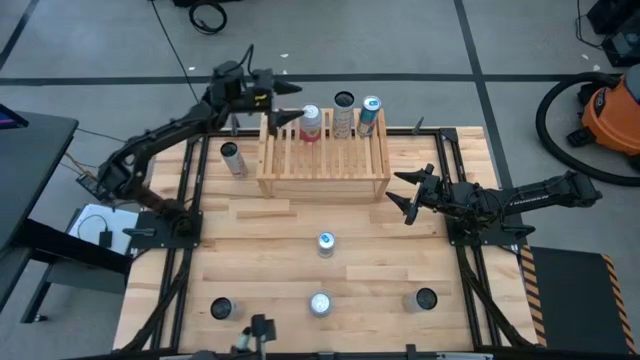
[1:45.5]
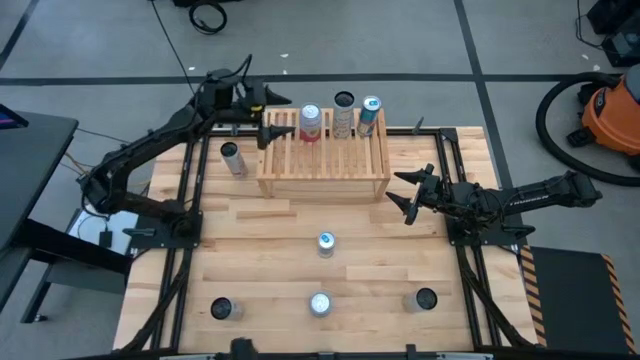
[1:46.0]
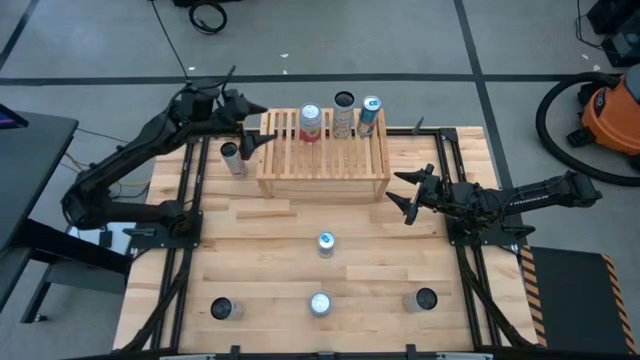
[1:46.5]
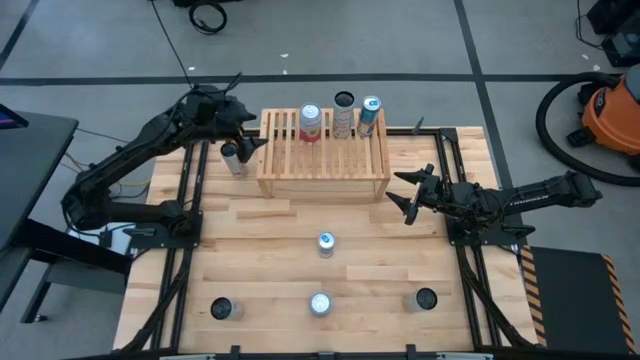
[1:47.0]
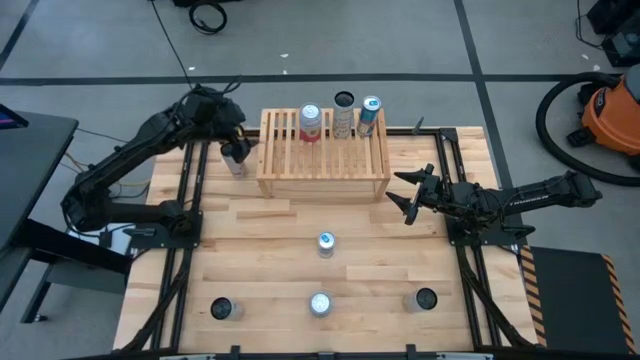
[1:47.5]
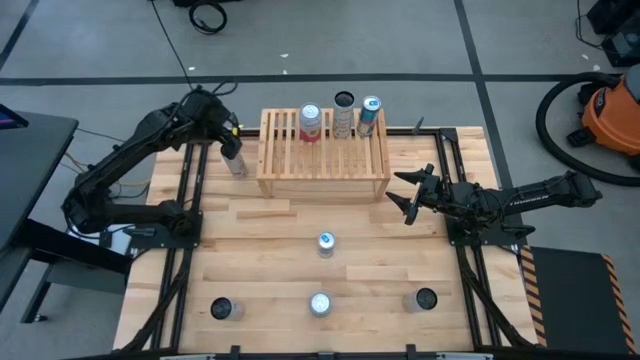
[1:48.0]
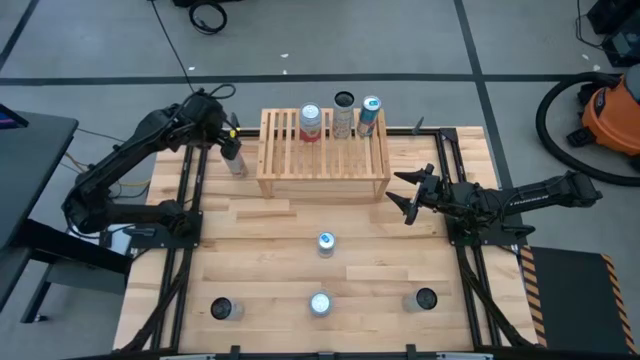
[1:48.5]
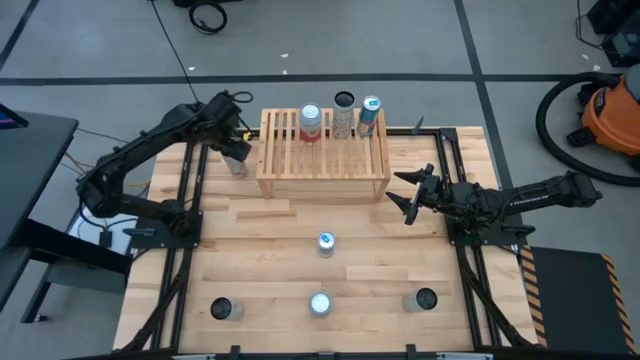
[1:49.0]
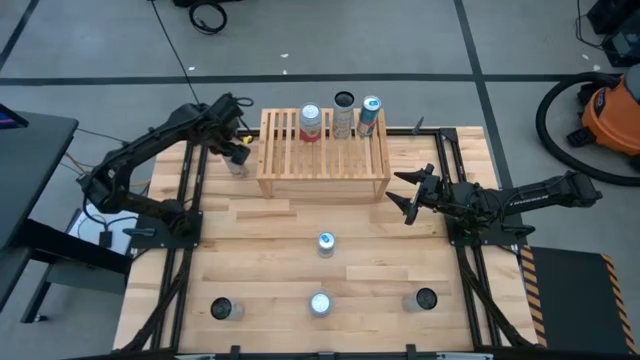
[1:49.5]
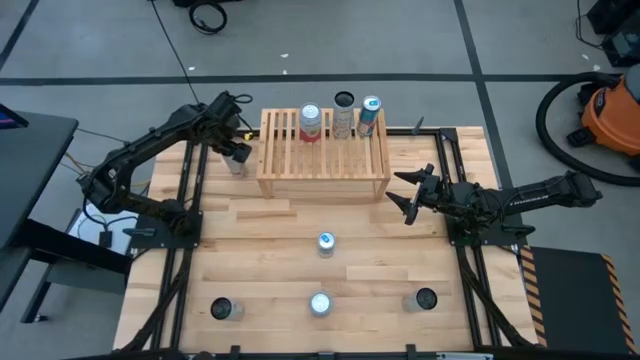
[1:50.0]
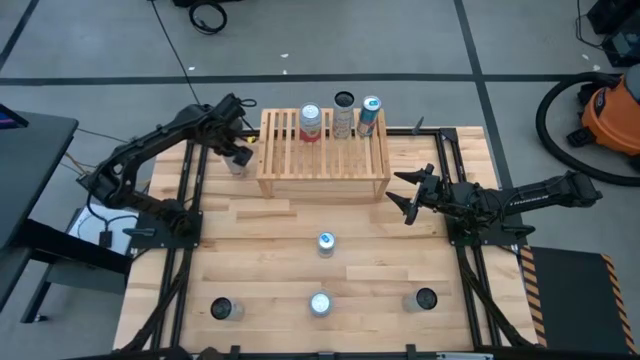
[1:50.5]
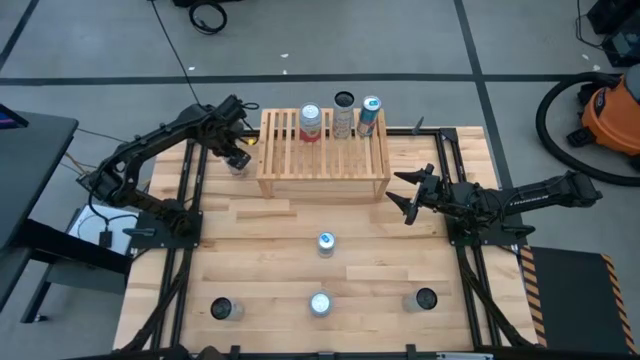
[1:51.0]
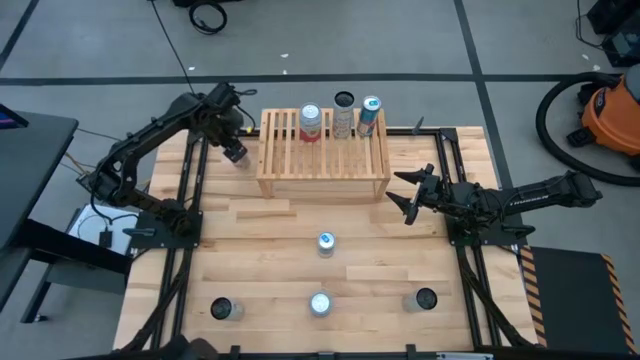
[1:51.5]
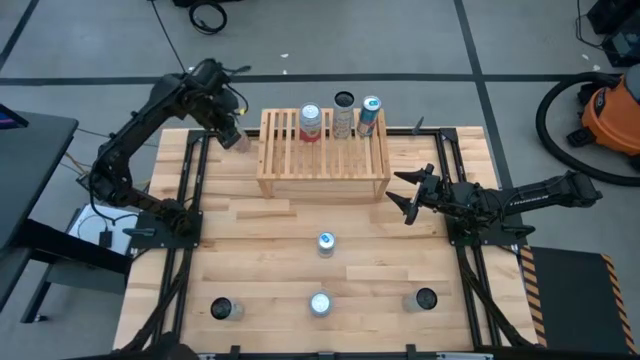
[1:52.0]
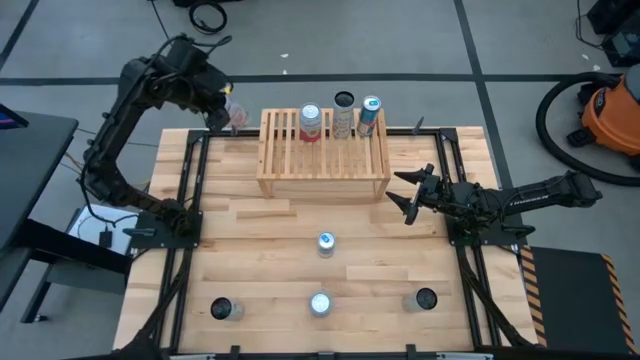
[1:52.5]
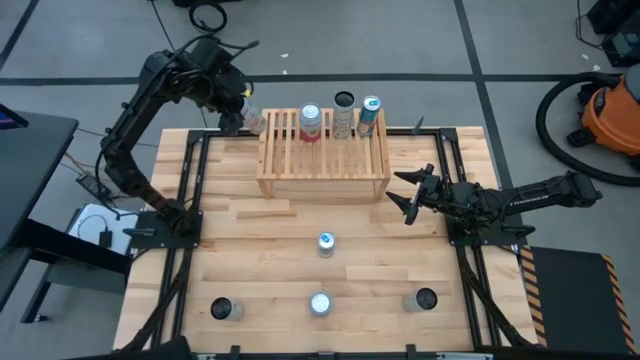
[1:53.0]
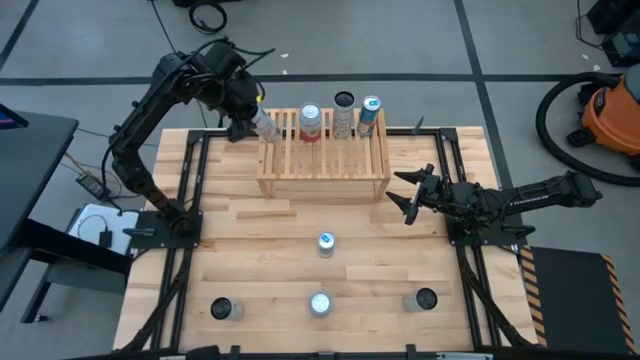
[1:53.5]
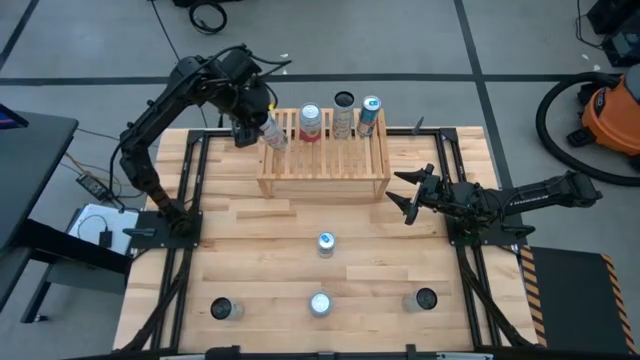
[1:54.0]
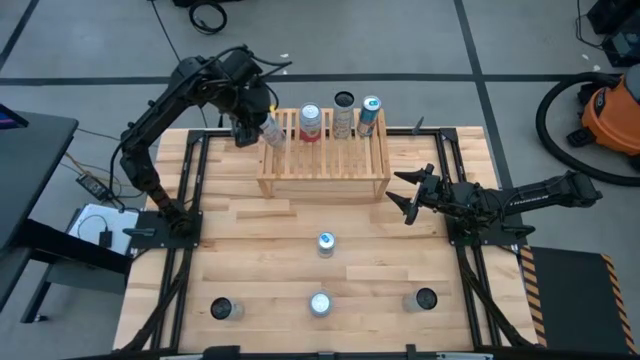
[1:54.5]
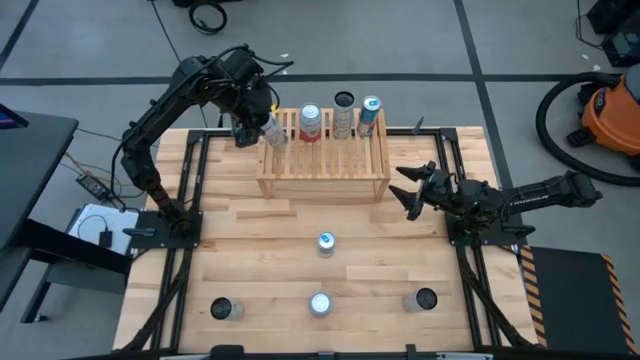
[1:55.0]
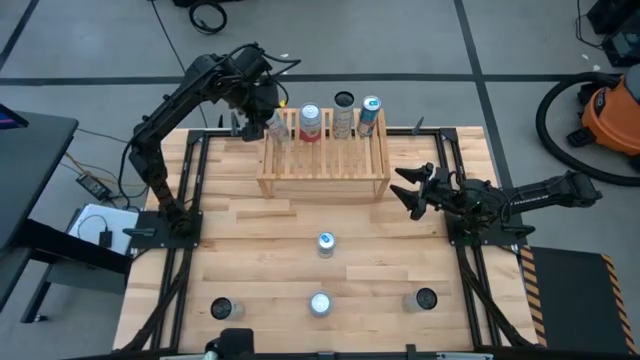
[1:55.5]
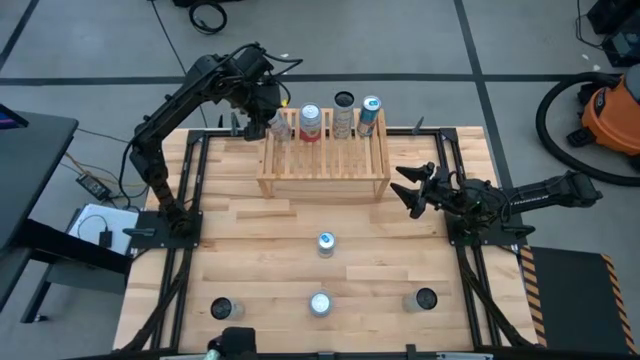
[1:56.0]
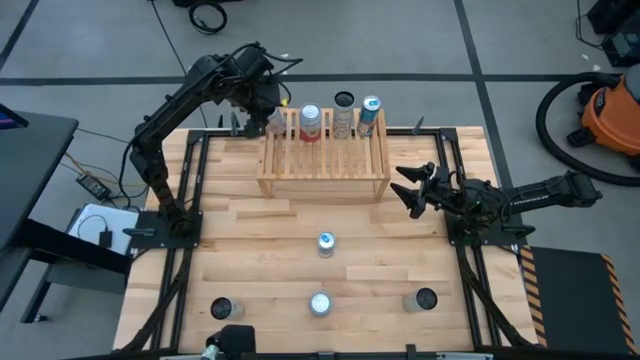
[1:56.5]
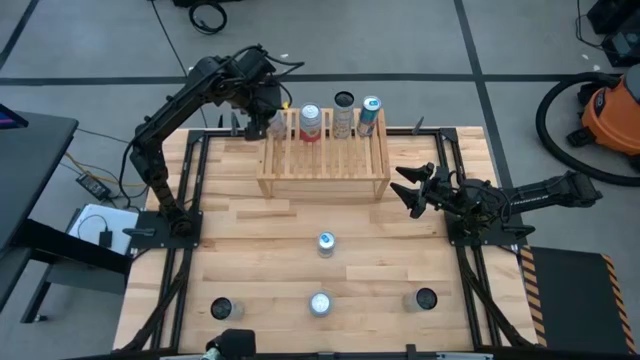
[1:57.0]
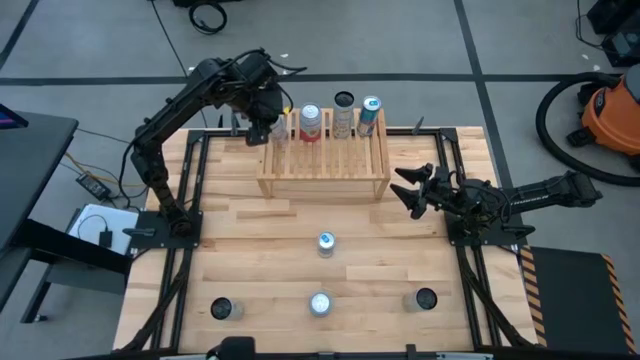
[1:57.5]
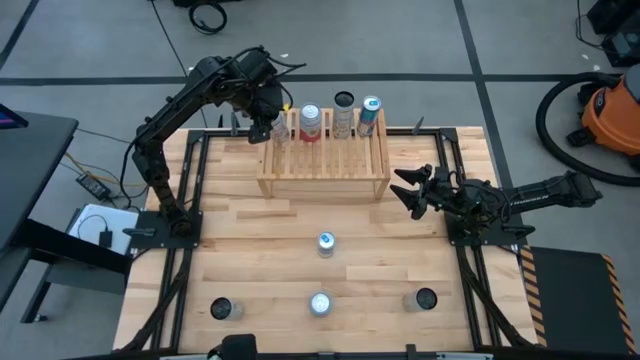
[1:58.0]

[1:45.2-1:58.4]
Task: Place canned beverage on shelf
Put the top white and pink soda can on the shelf

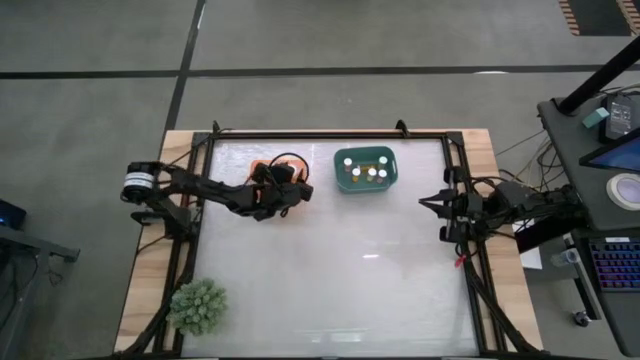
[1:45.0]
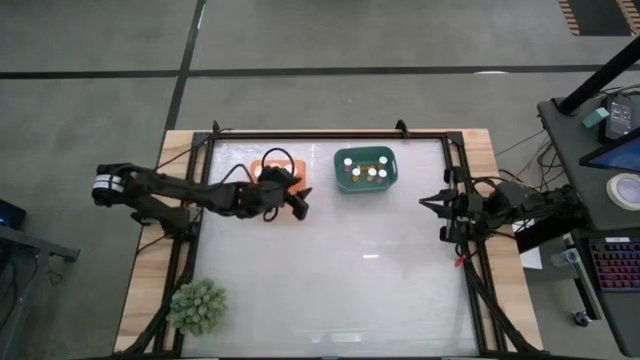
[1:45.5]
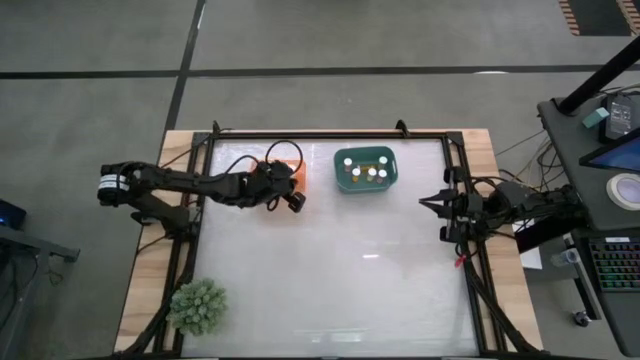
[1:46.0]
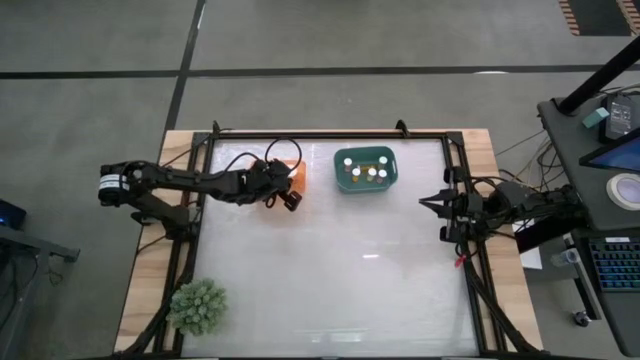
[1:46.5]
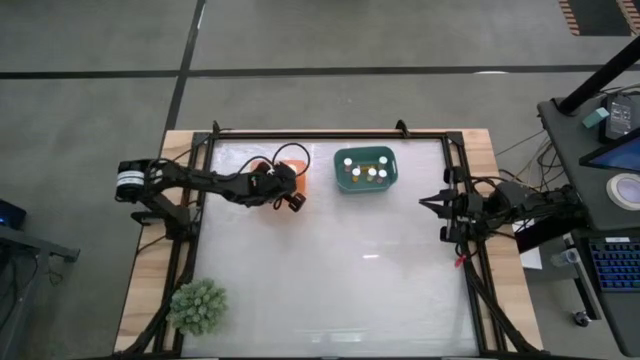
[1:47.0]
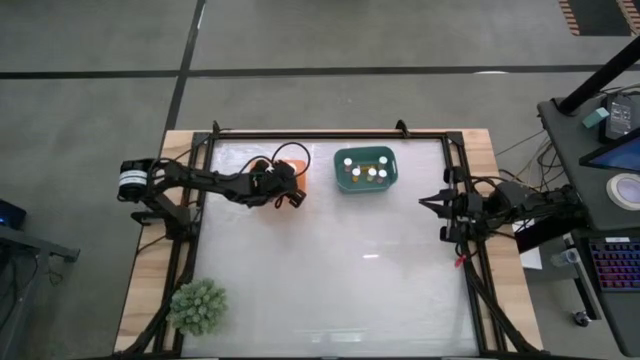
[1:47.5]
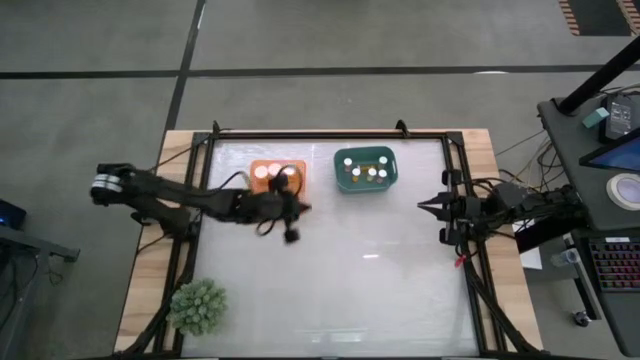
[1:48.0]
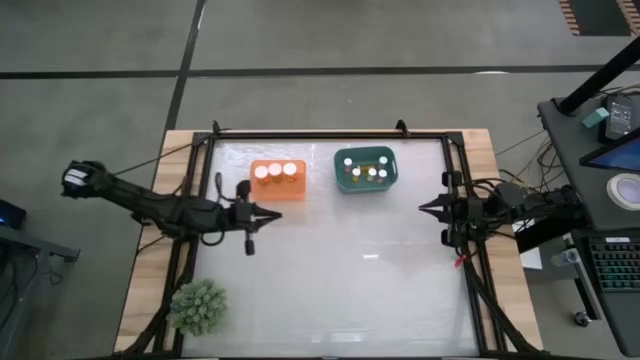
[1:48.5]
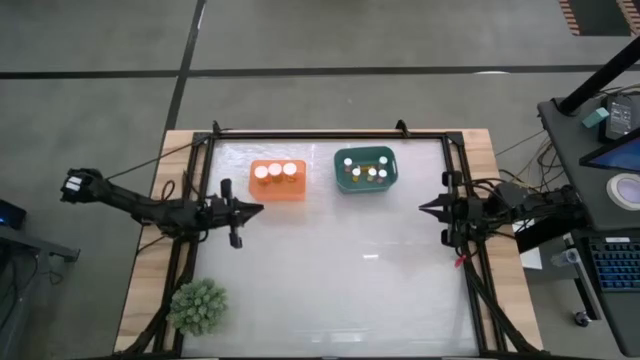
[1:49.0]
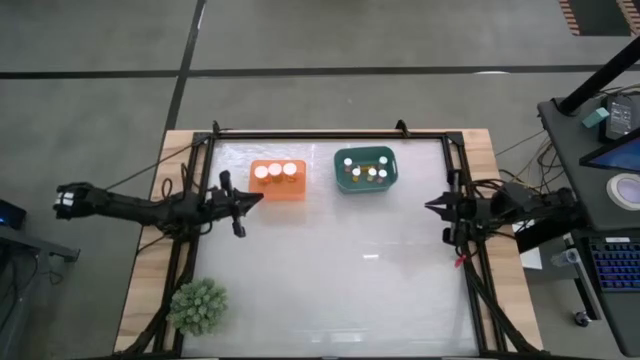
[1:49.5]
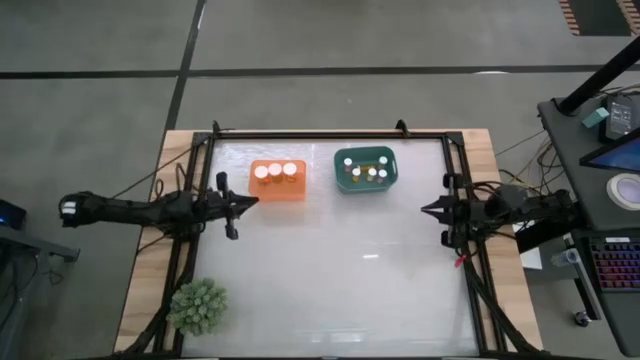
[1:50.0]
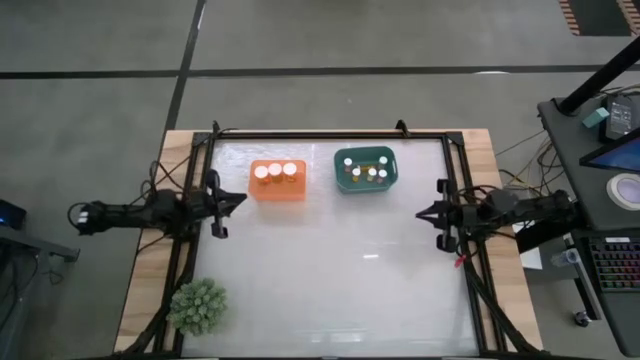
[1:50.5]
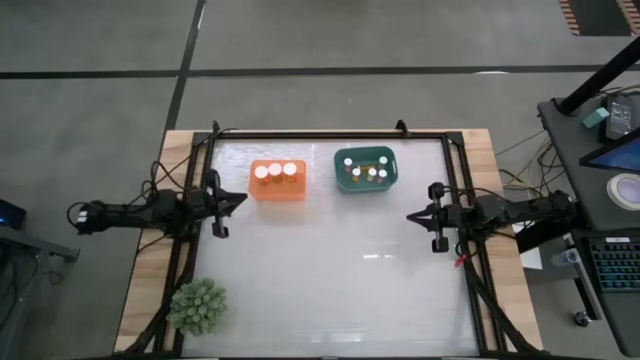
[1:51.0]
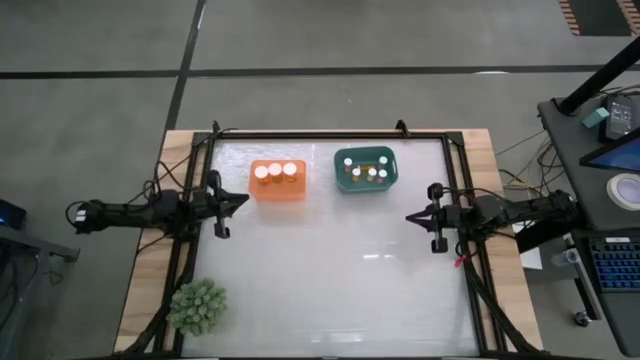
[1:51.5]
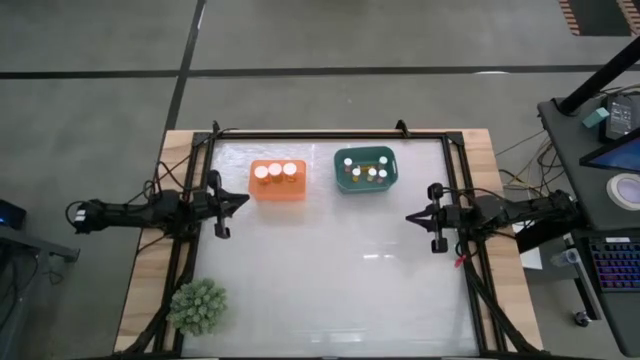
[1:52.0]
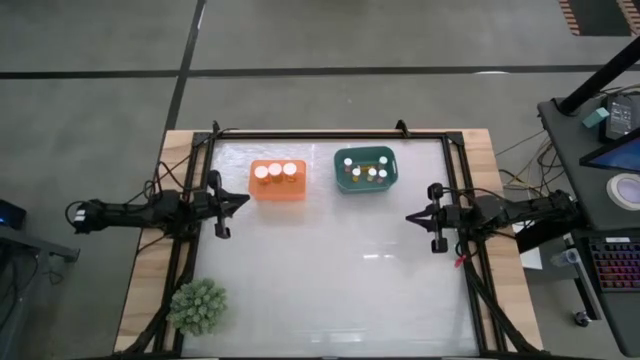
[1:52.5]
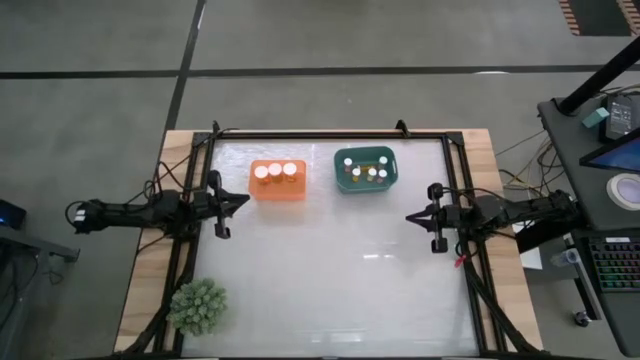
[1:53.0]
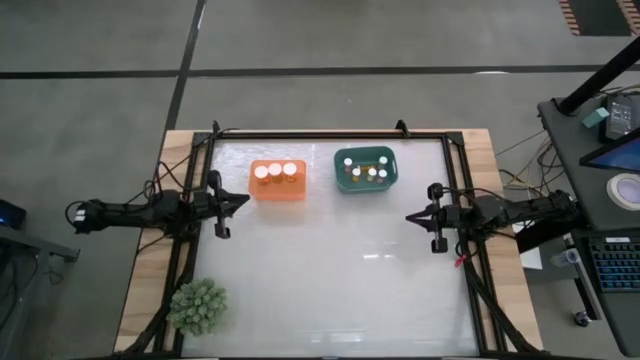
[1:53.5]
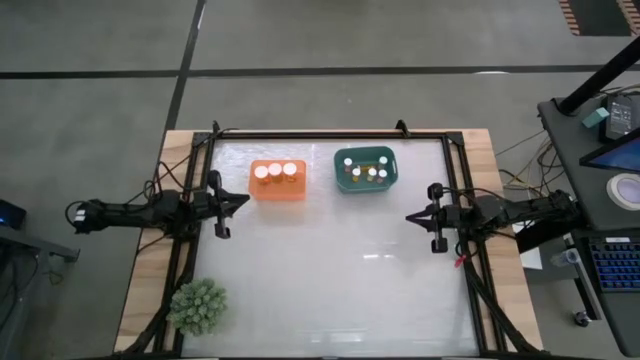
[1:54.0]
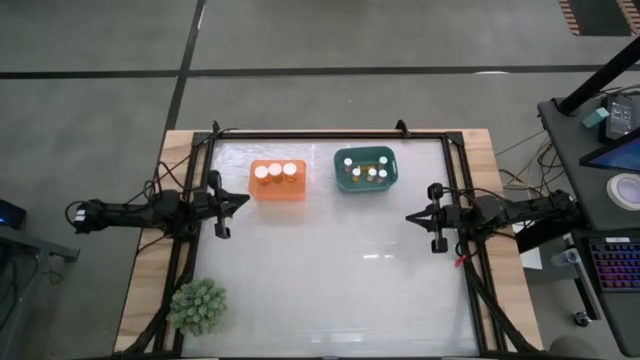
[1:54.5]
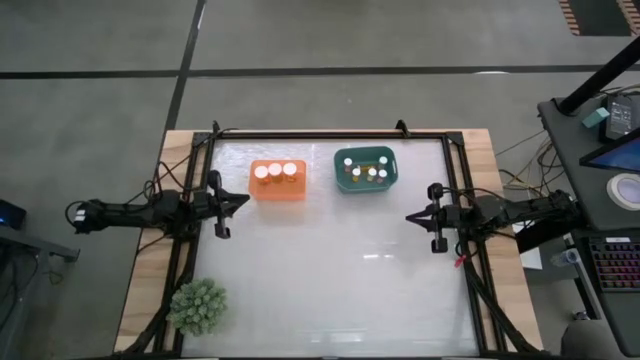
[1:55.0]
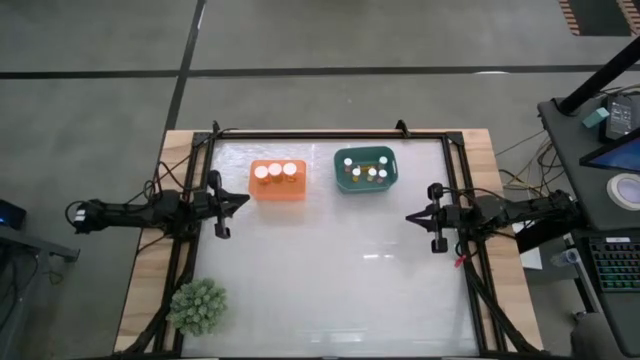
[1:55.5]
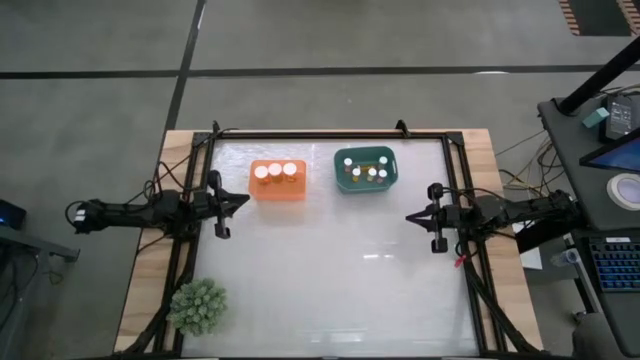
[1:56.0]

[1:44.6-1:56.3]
Task: Pick and place medicine bottles into bin by pill shape (circle, oval)
Return to Home Position
